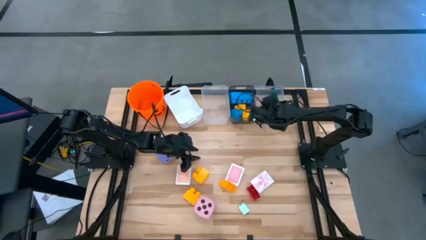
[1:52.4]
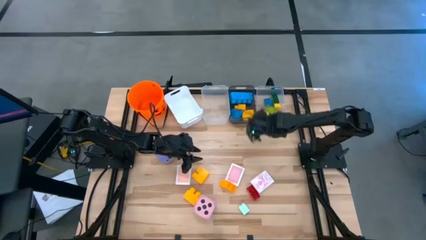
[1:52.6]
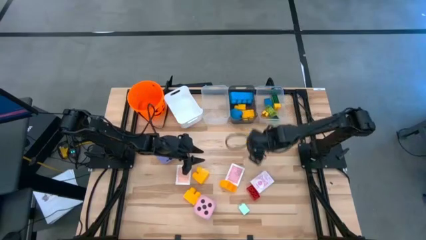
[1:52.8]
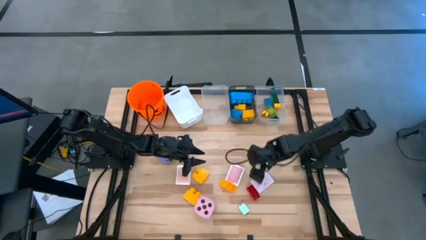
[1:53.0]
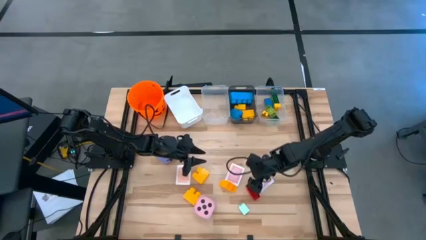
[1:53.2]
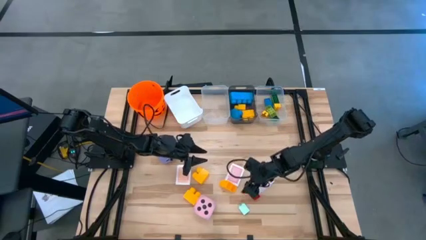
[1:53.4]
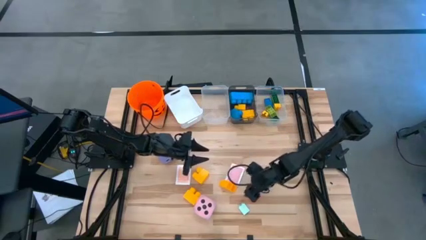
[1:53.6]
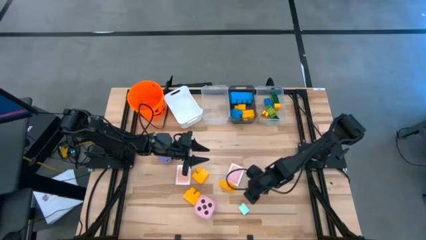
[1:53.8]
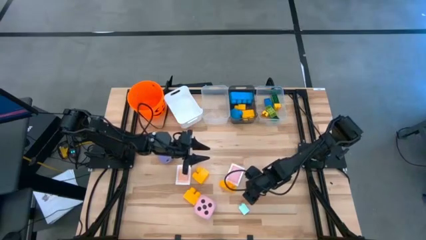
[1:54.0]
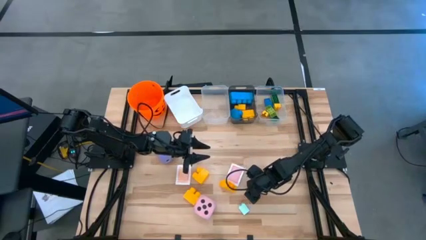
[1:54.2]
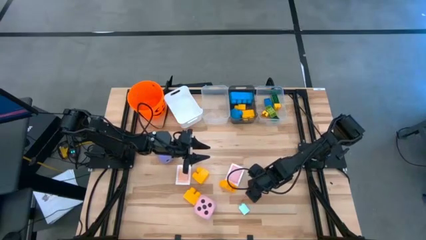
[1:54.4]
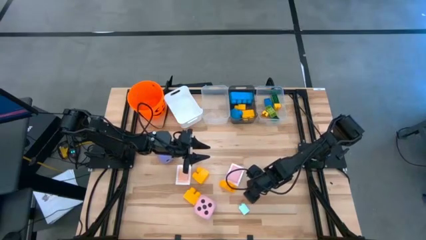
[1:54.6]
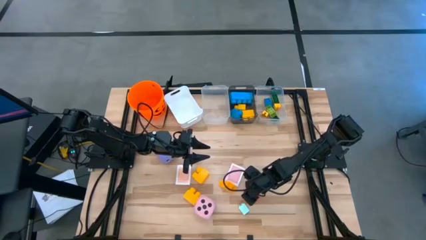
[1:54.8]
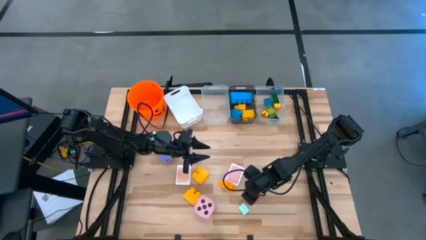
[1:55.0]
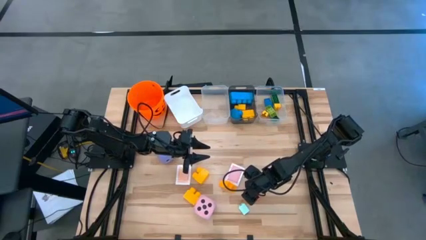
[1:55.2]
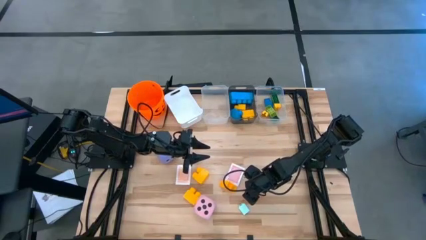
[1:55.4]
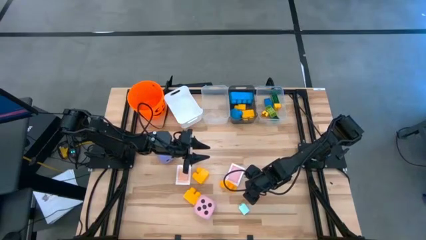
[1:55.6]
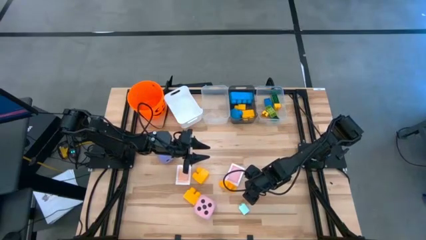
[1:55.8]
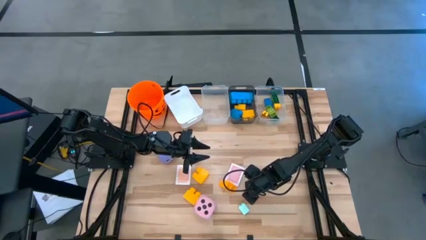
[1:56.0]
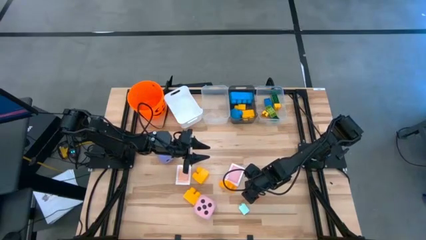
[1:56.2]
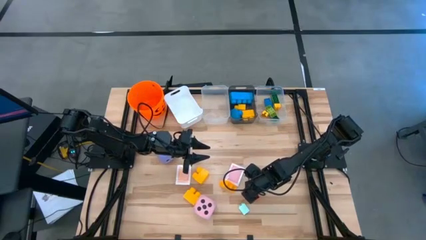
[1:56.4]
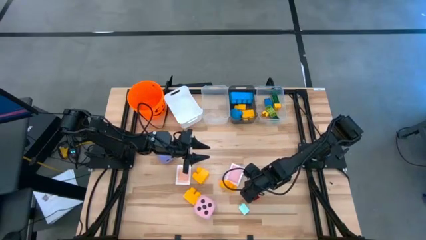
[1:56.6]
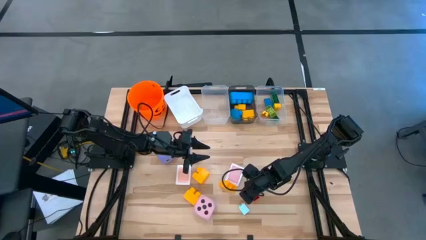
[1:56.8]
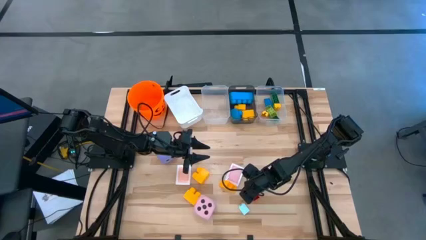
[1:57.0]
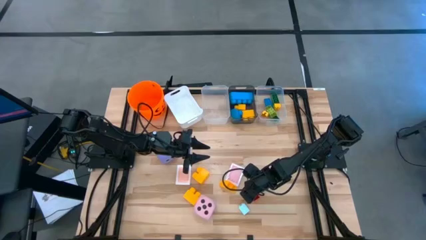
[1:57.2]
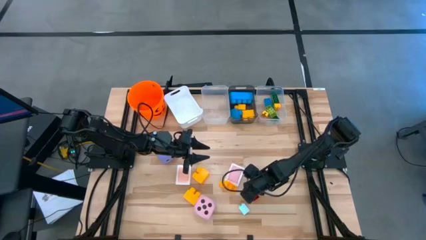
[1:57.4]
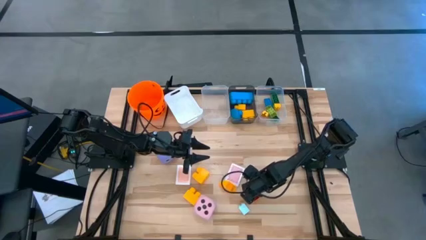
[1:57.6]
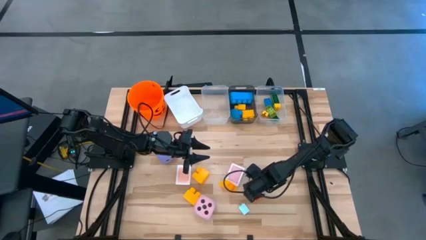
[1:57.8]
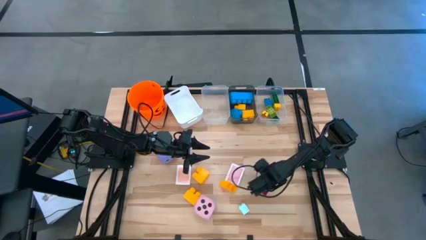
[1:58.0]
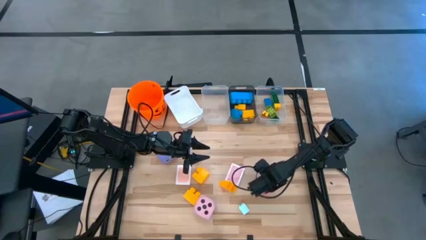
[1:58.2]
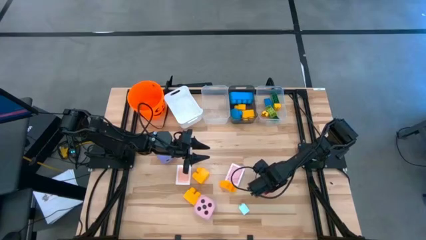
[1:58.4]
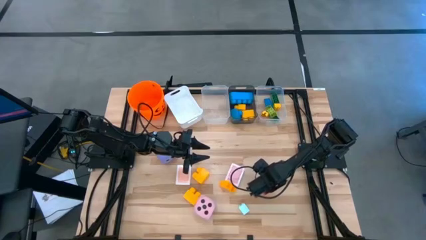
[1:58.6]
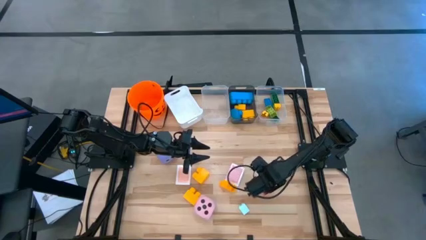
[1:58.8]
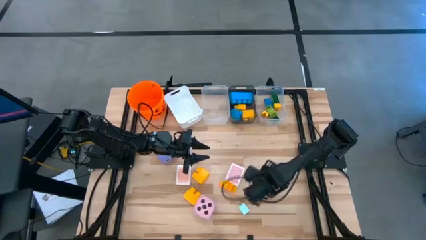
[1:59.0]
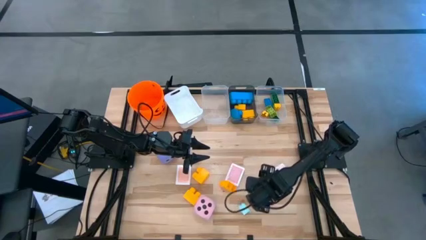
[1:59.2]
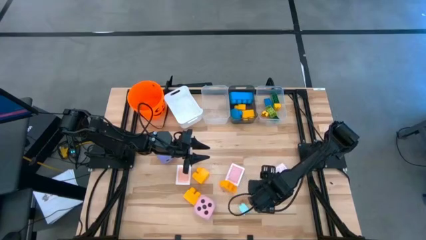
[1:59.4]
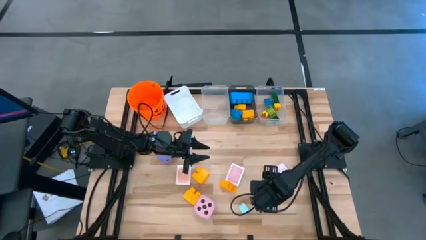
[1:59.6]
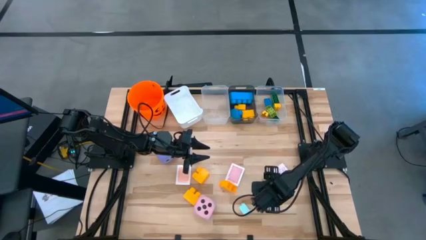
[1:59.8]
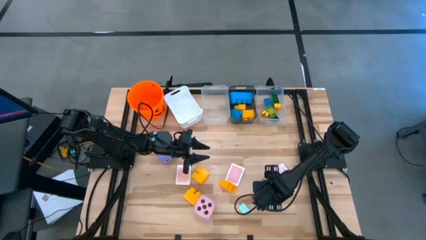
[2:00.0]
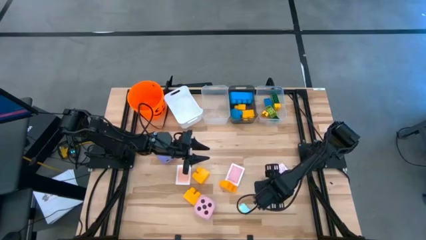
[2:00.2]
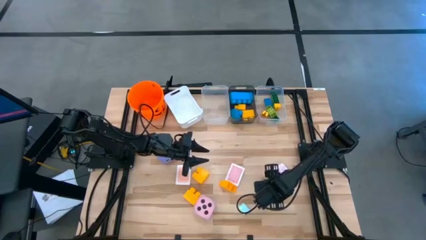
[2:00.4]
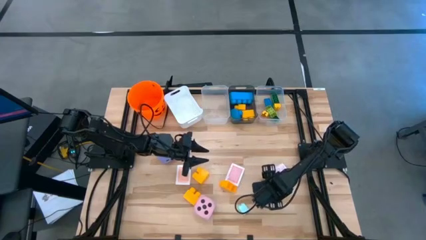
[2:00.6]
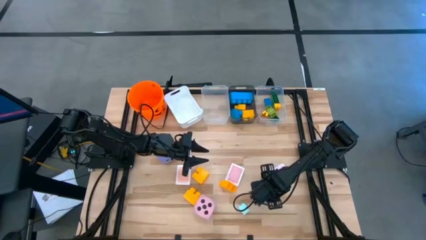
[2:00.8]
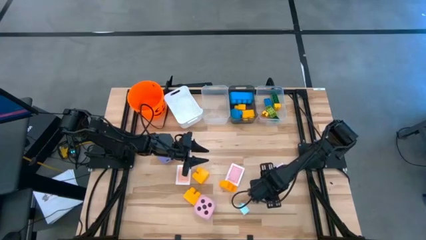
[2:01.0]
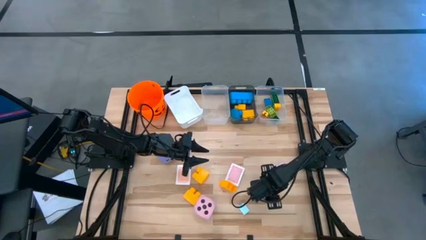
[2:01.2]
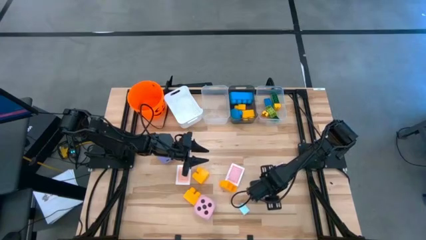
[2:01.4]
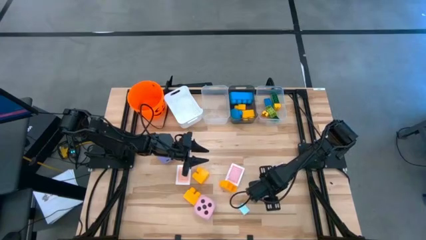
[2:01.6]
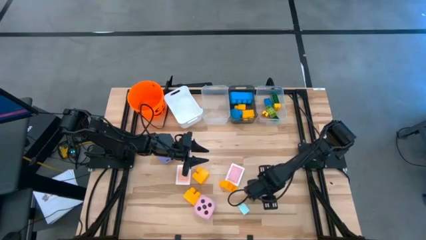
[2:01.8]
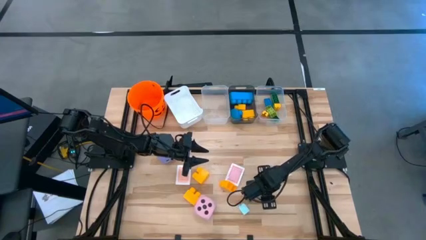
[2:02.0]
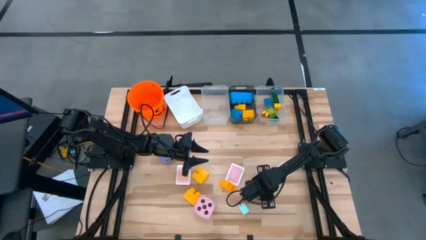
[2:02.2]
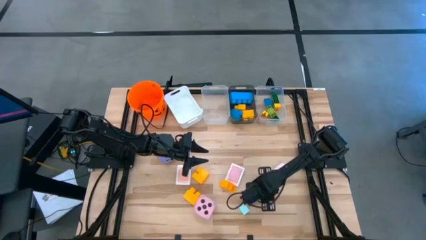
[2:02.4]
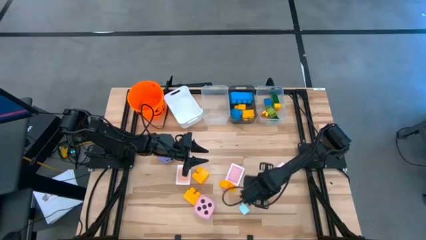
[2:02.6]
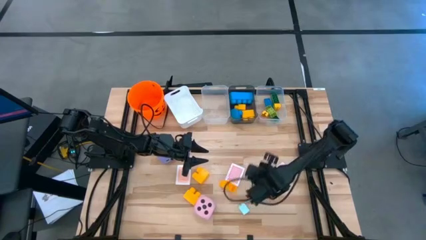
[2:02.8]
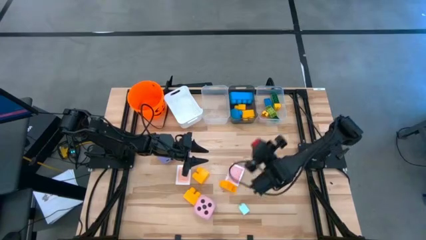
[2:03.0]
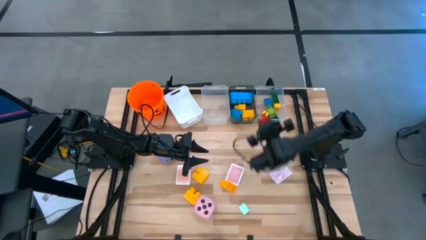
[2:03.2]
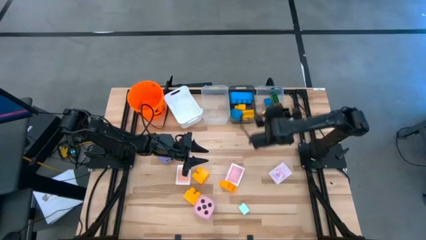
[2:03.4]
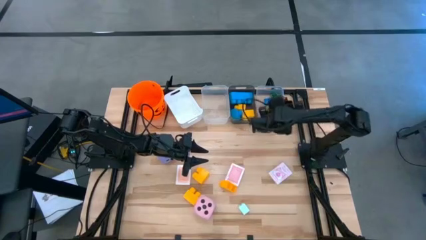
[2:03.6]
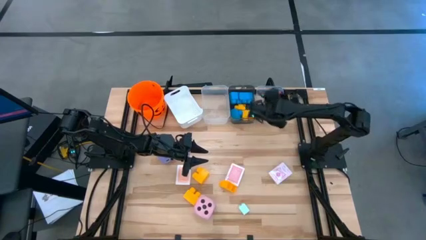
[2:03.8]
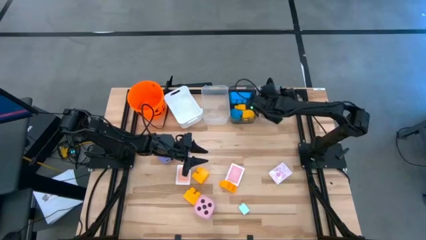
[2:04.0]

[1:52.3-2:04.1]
Task: Pick & Place Toys
Put the small red game piece into the right transparent bin

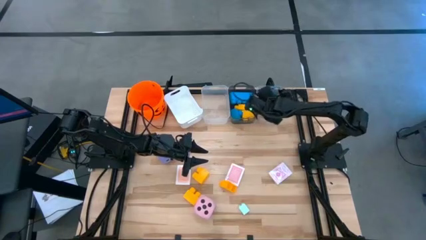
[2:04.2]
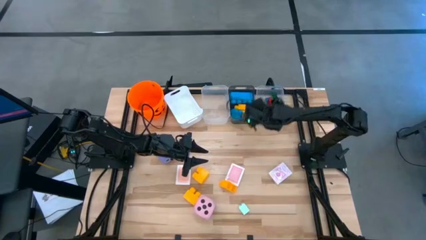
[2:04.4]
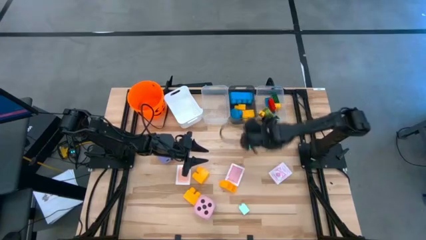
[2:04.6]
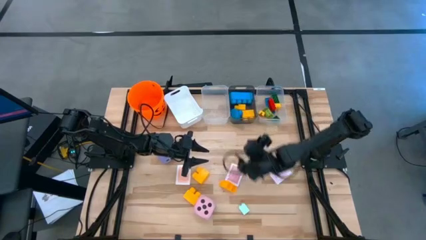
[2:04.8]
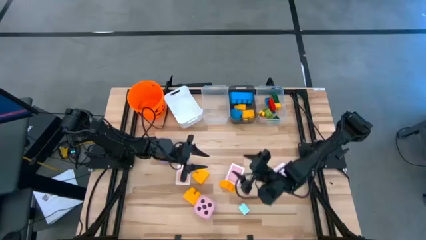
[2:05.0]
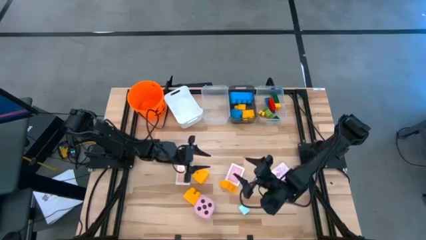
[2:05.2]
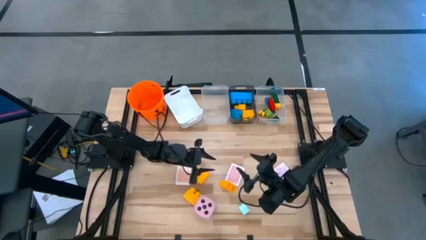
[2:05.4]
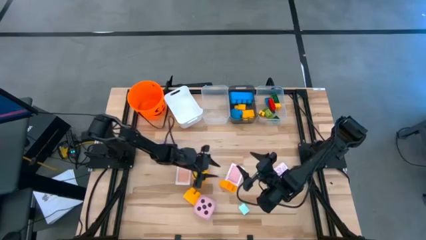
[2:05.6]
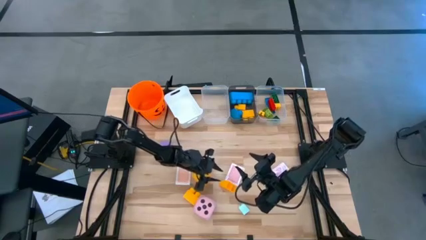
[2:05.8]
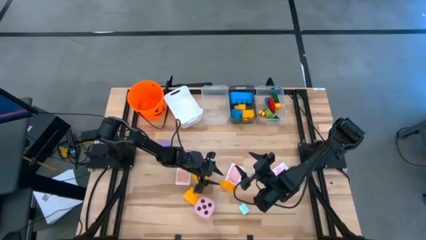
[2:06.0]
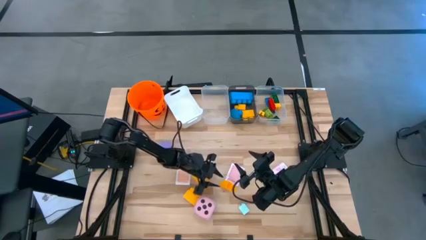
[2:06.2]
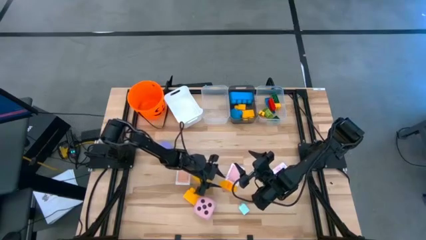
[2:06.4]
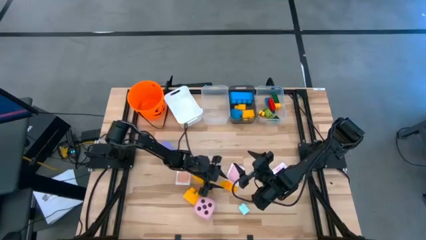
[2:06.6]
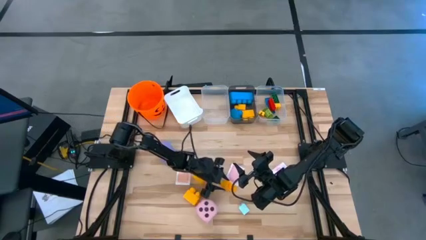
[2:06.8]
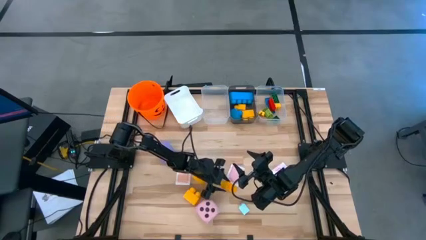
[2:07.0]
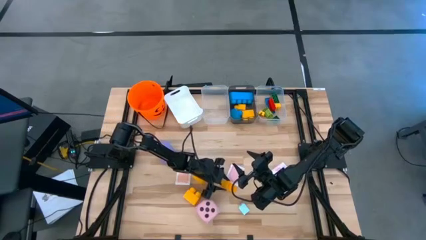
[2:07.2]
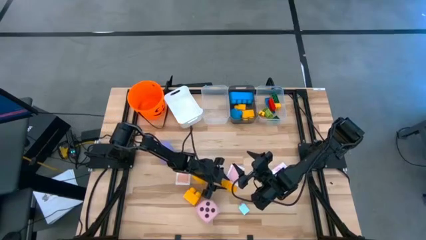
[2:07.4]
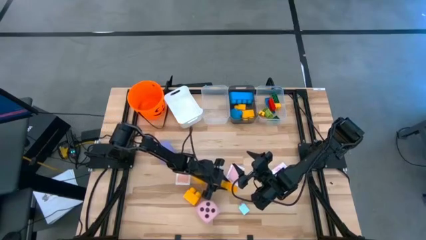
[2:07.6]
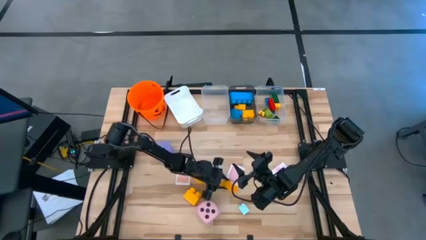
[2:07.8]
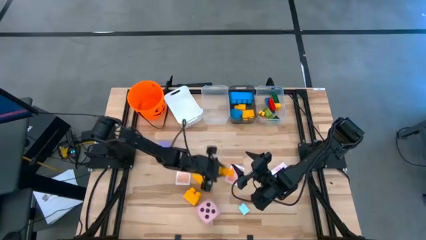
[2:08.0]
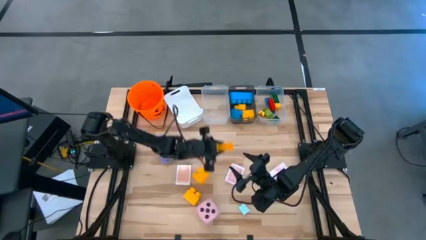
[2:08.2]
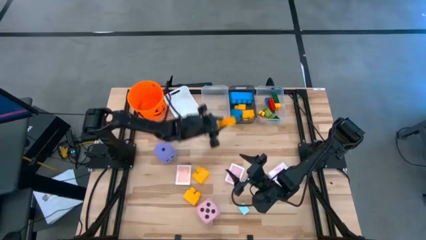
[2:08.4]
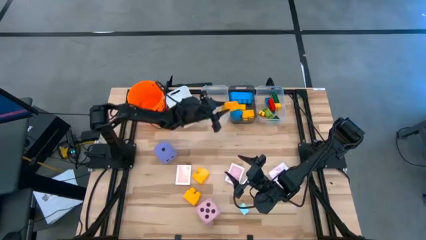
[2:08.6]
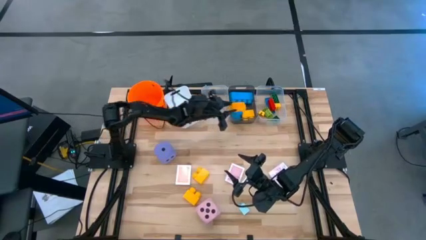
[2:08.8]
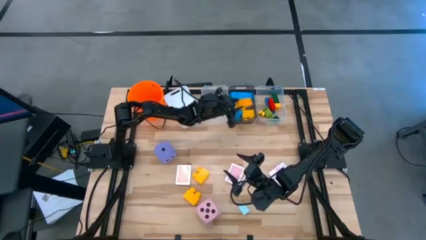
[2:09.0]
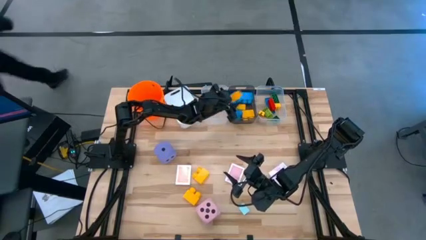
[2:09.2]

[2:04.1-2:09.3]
Put the large yellow game piece into the black bin
